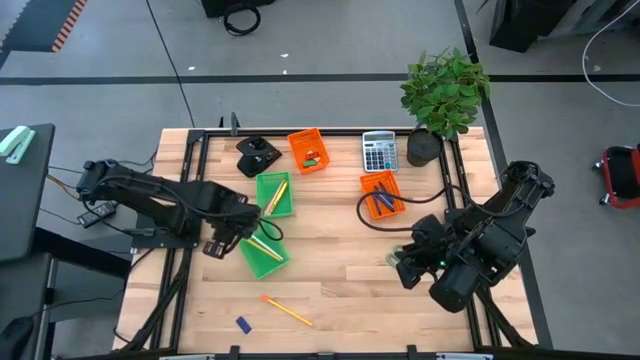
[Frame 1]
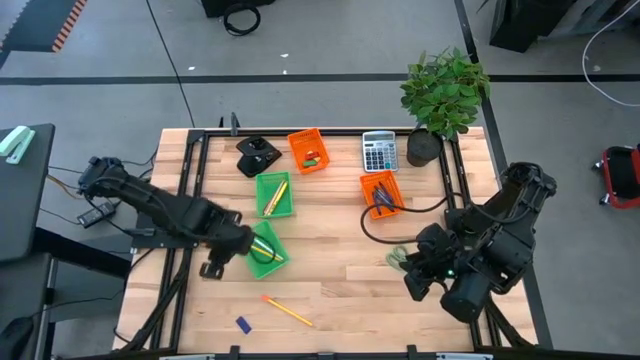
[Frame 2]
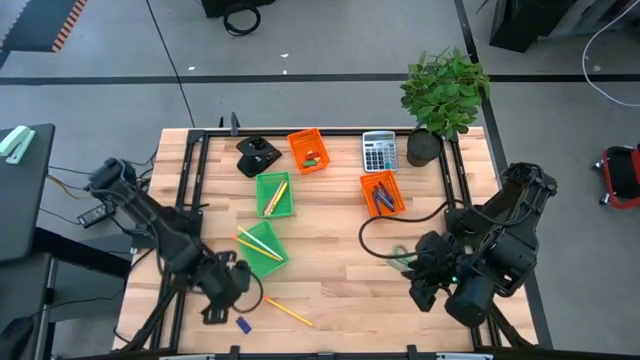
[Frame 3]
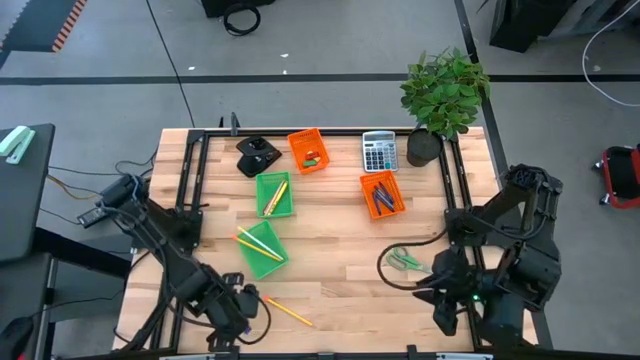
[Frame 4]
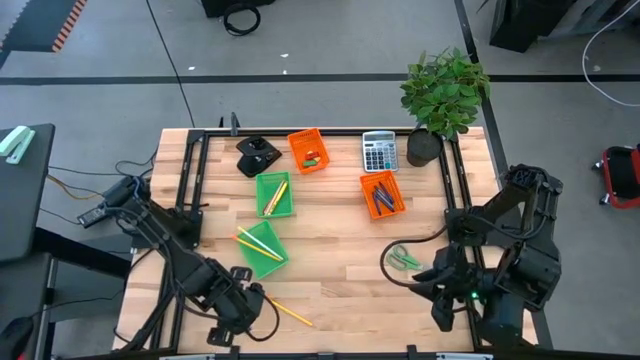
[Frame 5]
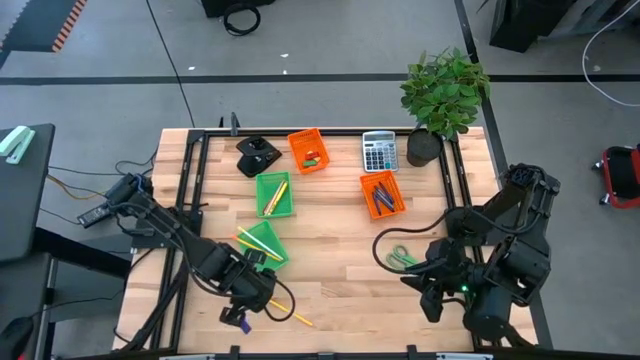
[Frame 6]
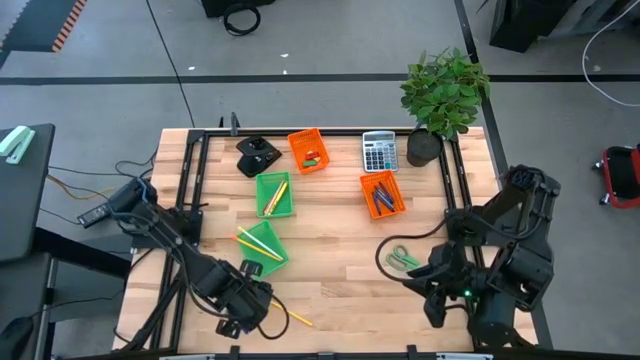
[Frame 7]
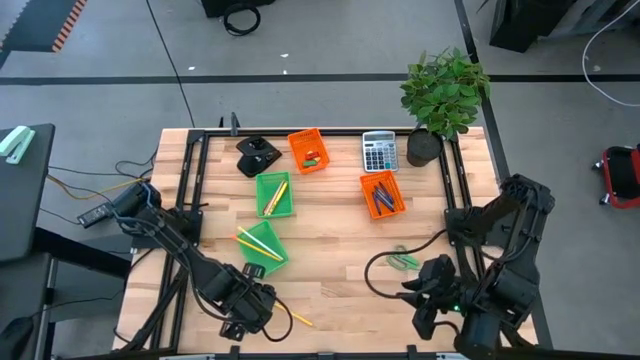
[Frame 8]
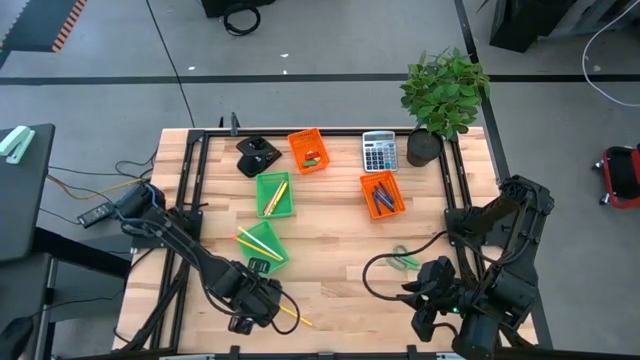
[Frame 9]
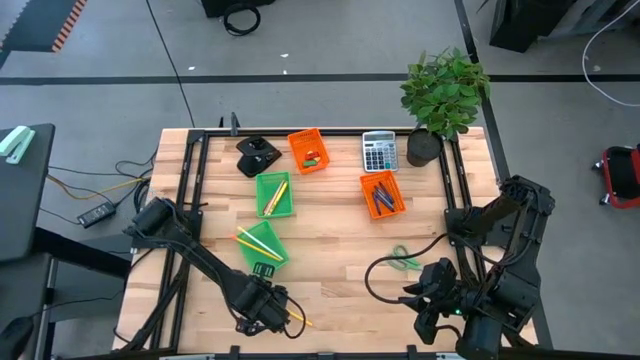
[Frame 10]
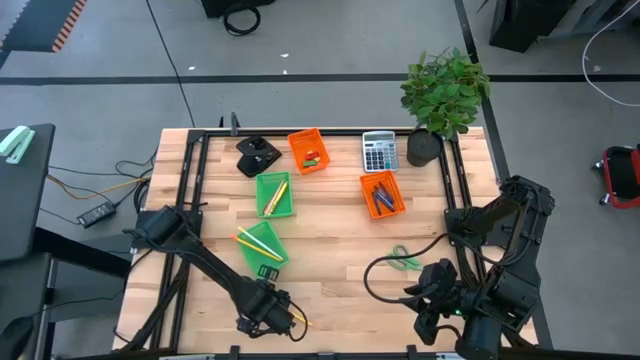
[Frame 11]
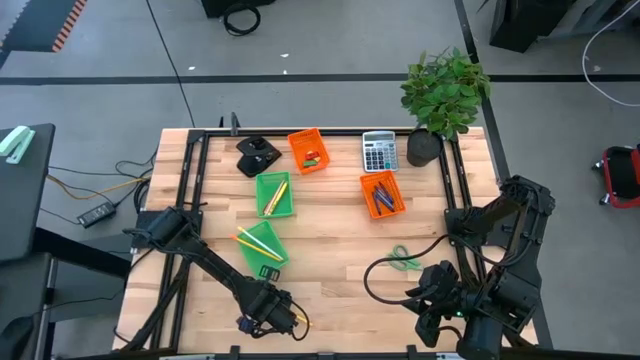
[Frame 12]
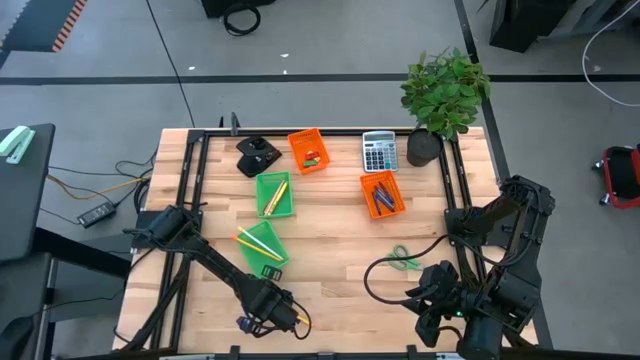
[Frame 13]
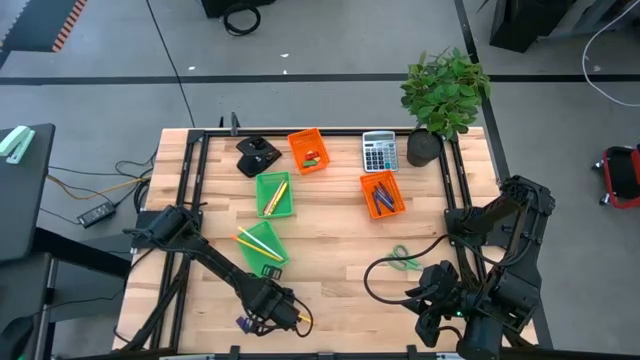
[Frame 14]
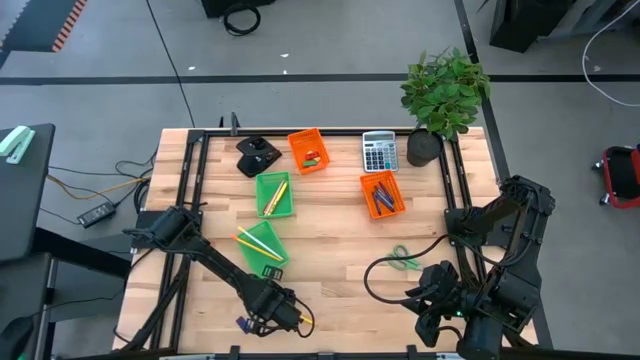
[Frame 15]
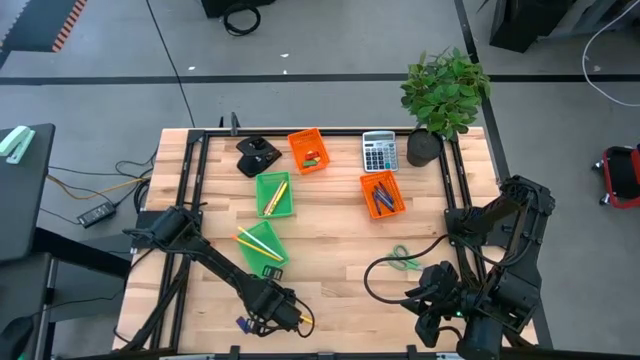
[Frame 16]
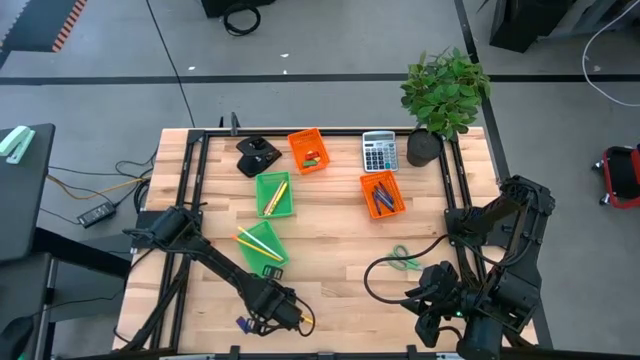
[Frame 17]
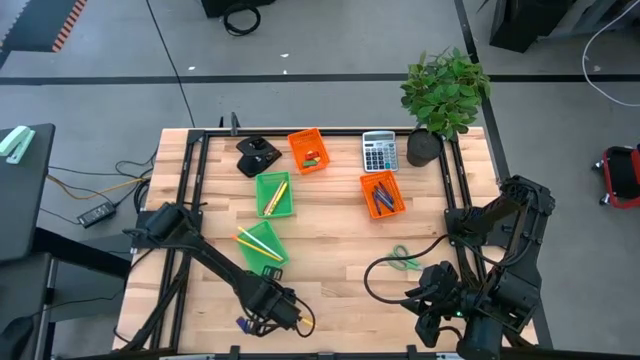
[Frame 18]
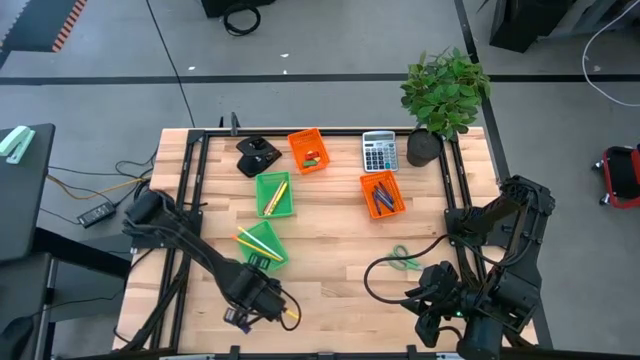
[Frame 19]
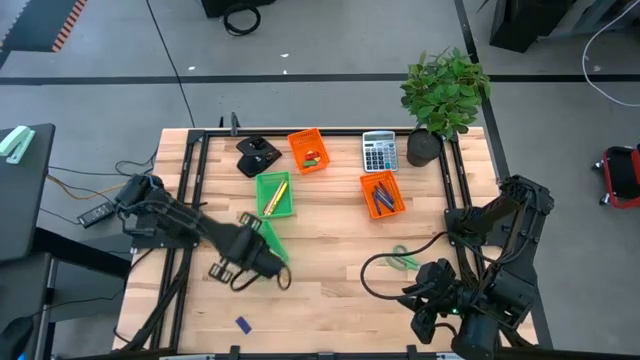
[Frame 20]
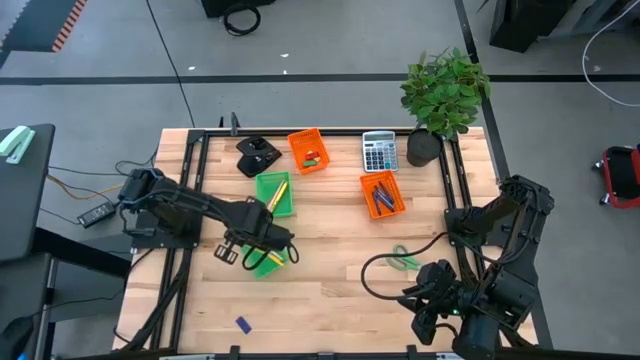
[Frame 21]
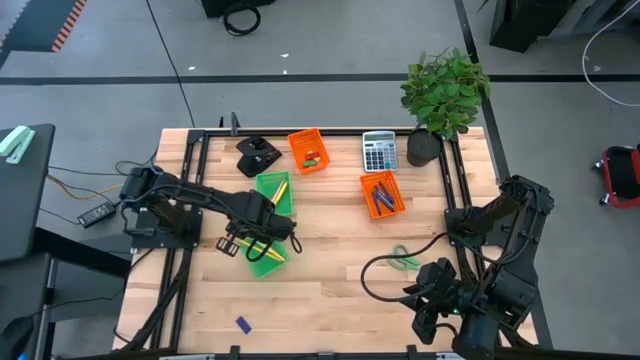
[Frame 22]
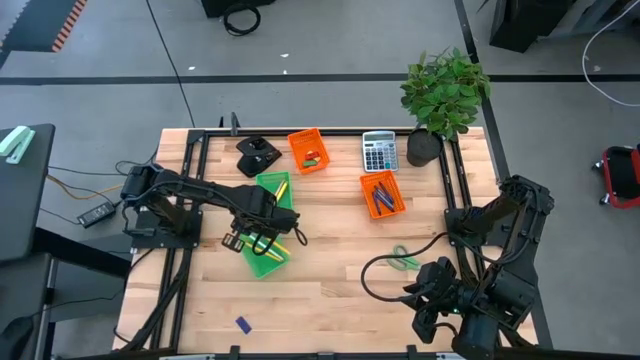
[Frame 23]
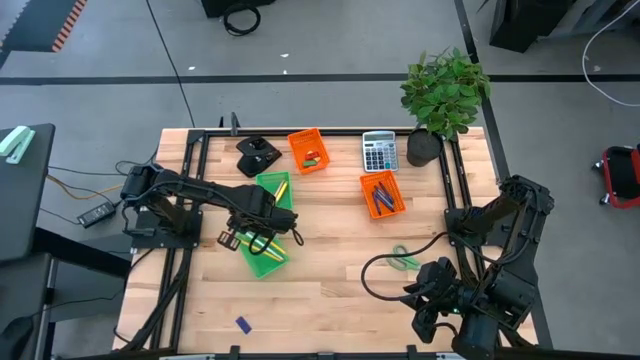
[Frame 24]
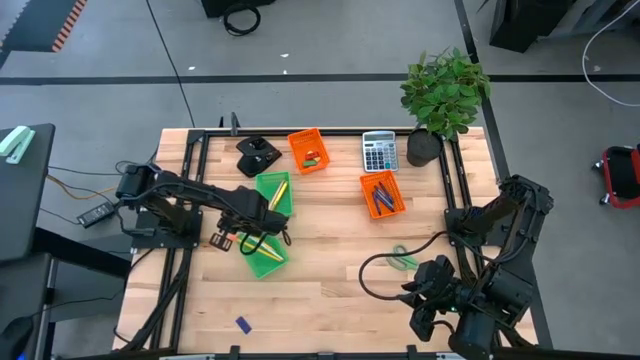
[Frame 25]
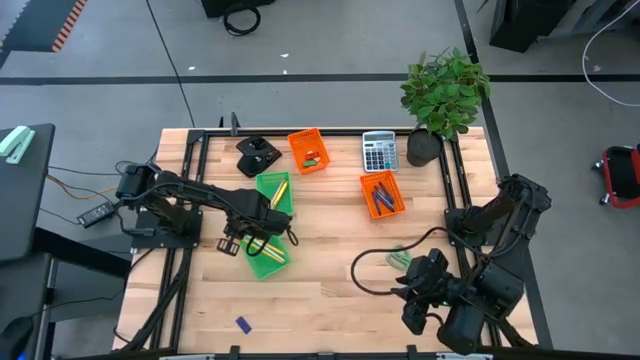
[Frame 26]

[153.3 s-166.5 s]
Task: Sort crayons/erasers/pens/pencils in bins
Put the yellow pencil into the bottom green bin

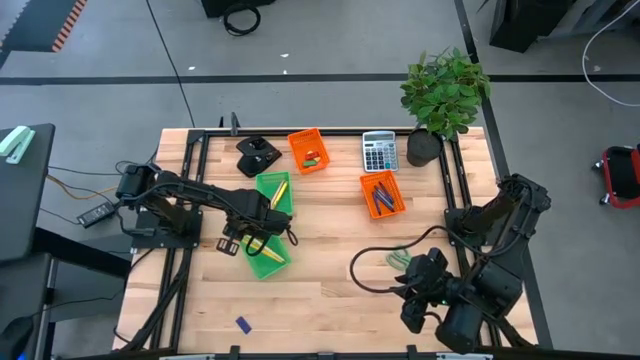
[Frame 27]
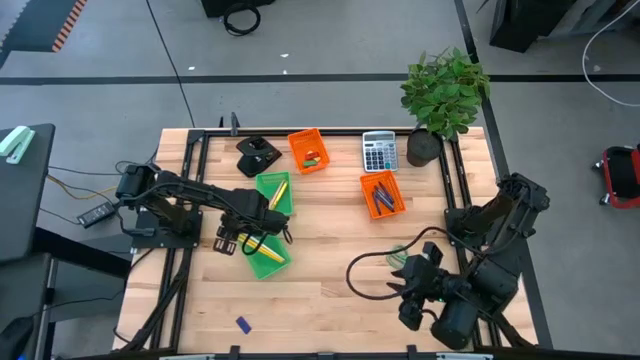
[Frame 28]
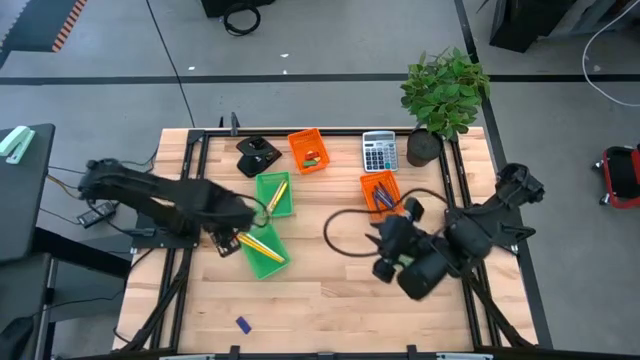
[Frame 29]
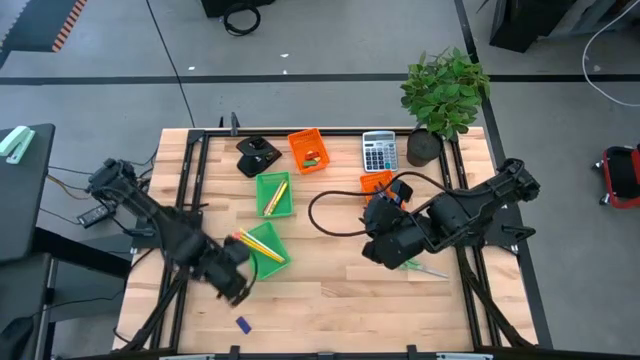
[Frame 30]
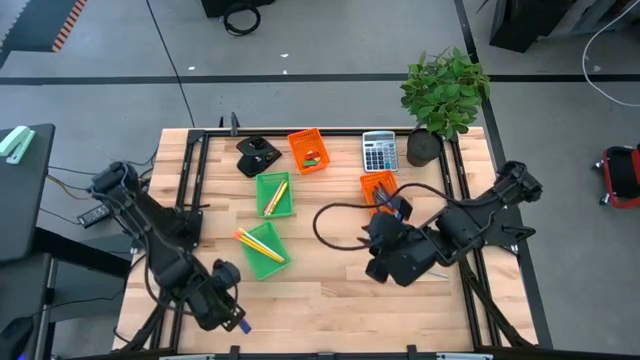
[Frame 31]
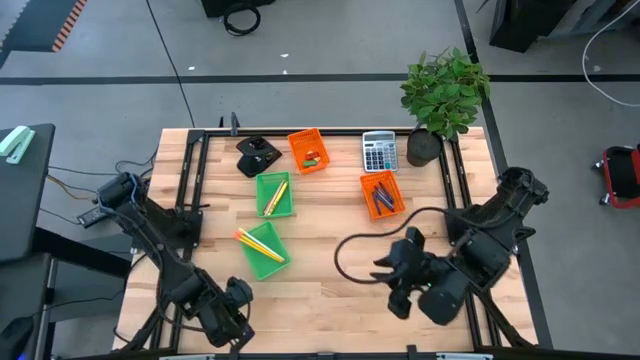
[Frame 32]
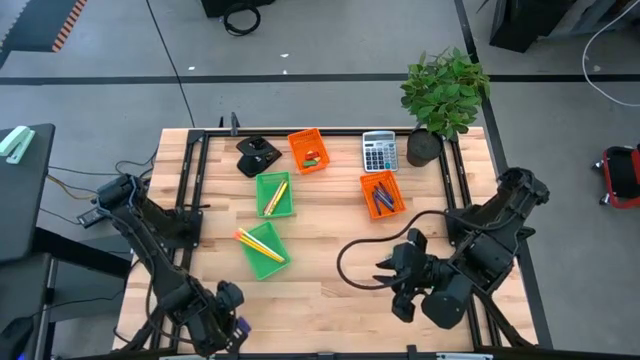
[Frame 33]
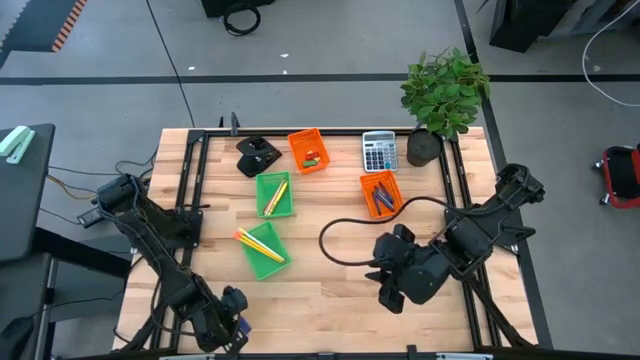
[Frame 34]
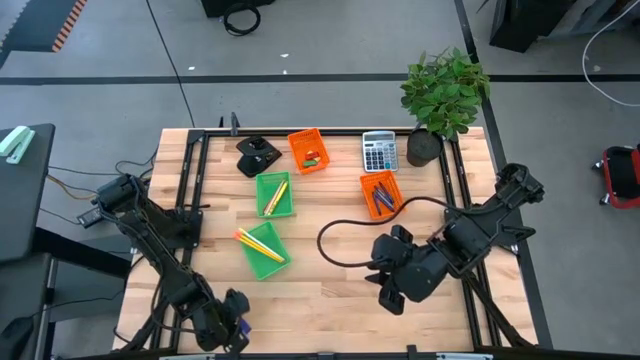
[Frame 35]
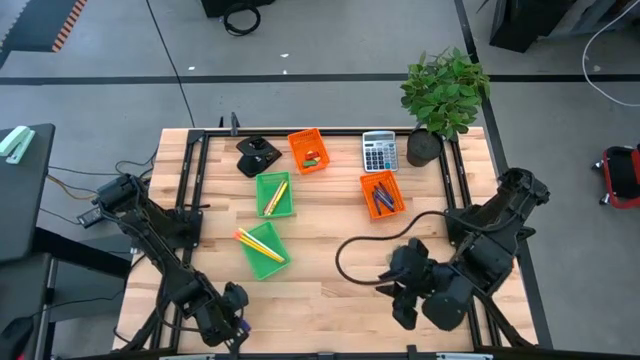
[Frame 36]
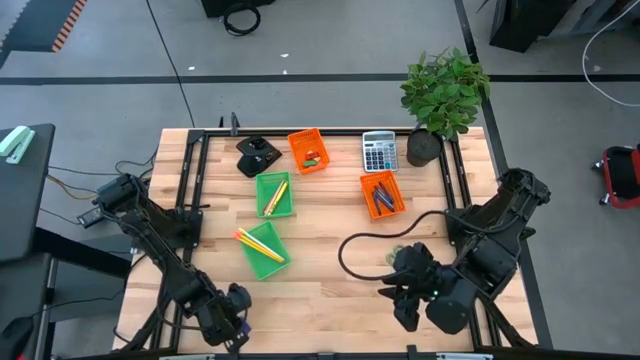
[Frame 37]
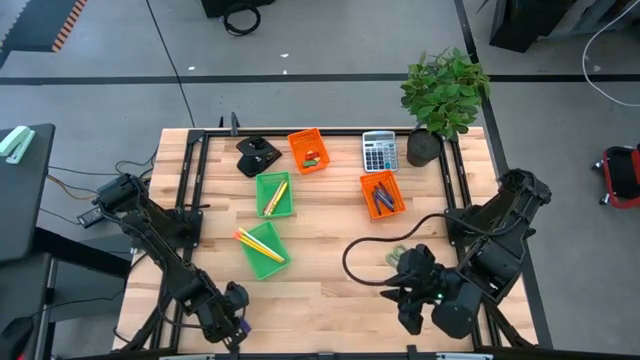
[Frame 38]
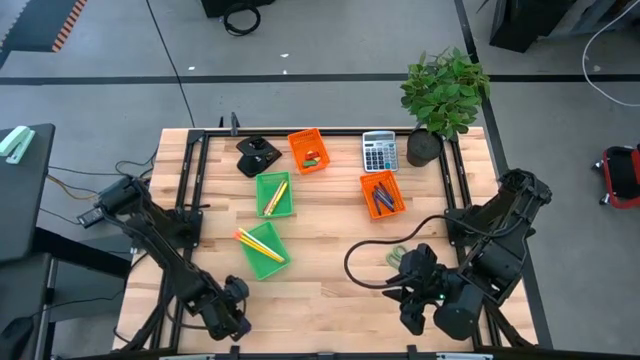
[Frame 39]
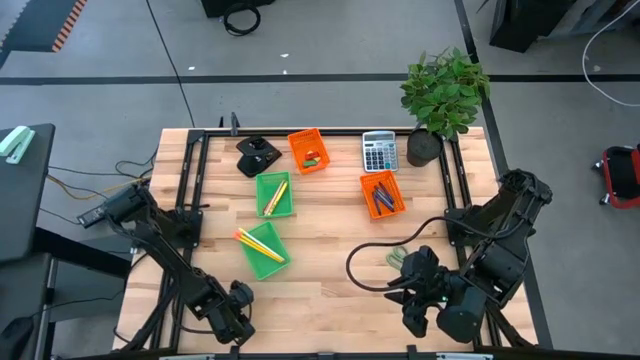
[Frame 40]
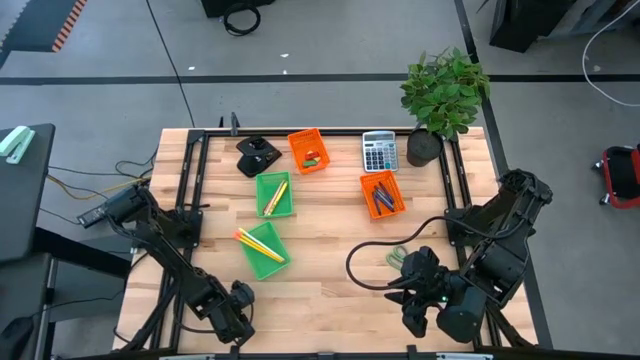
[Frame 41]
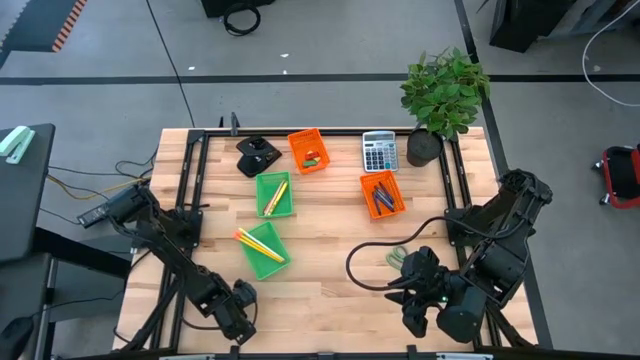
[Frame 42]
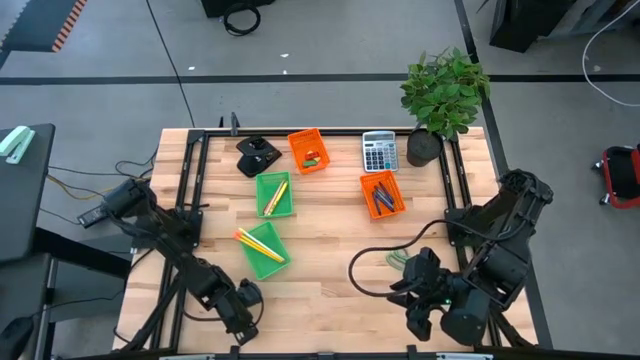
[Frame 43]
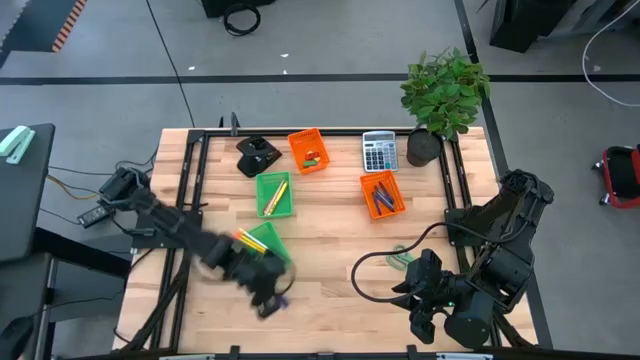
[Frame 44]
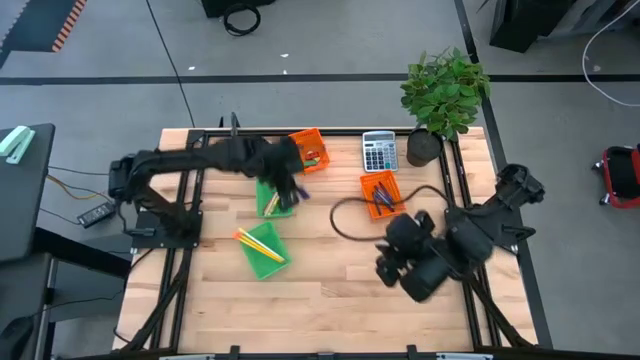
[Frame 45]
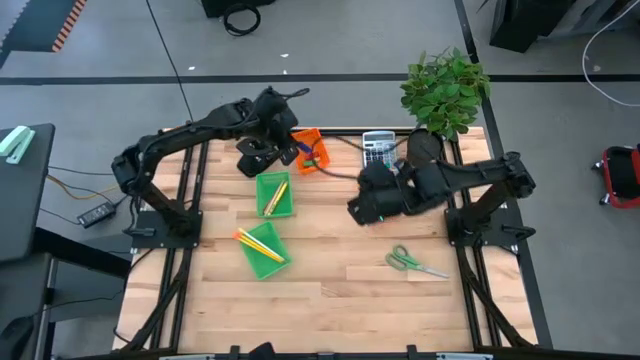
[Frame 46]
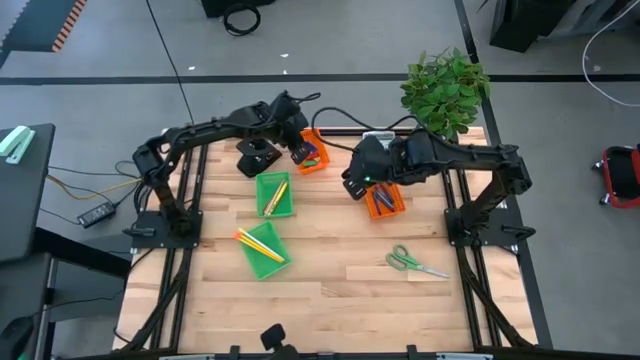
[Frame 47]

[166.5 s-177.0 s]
Put the blue eraser into the top orange bin
